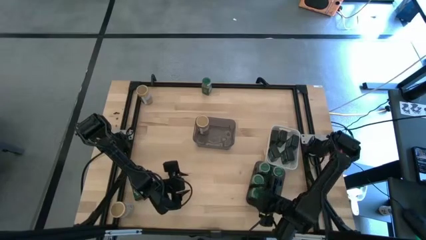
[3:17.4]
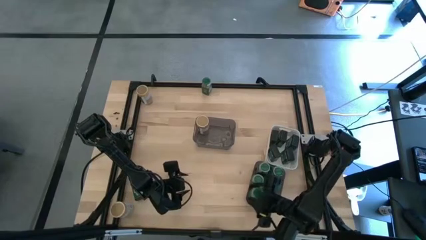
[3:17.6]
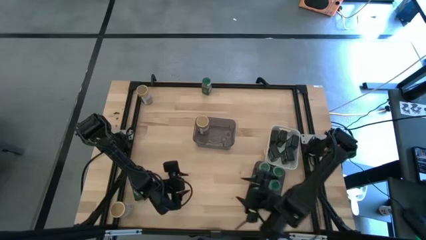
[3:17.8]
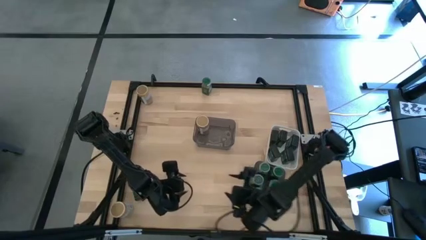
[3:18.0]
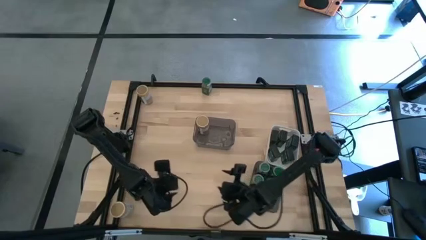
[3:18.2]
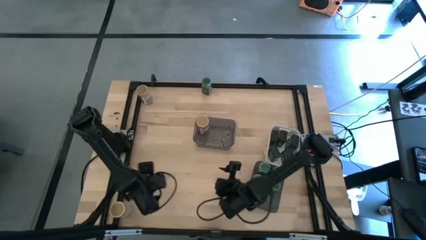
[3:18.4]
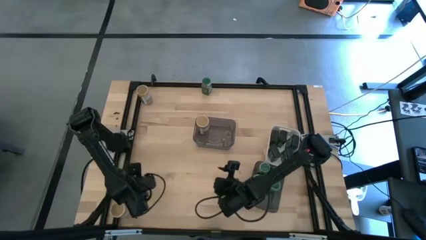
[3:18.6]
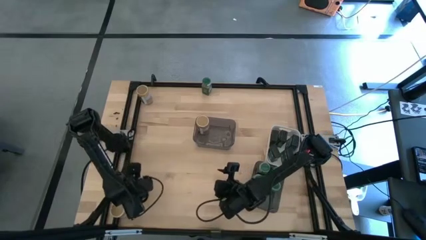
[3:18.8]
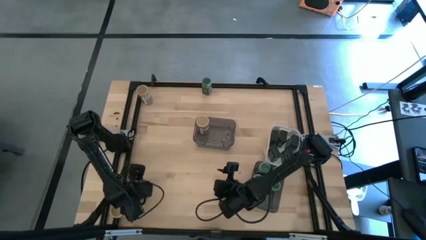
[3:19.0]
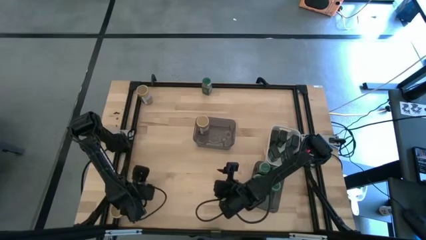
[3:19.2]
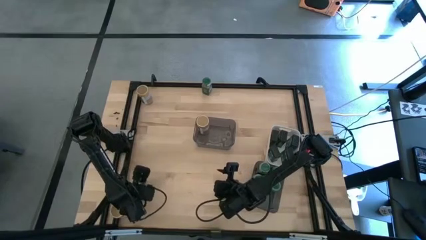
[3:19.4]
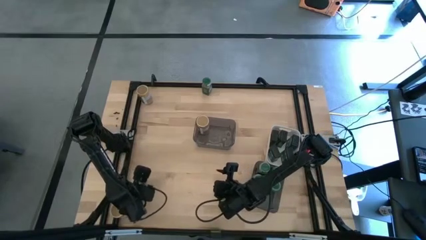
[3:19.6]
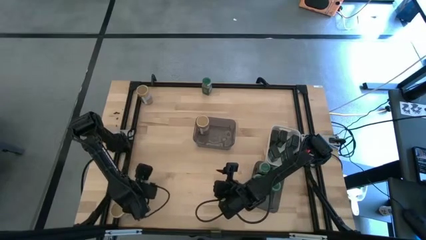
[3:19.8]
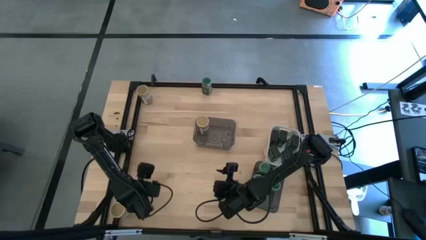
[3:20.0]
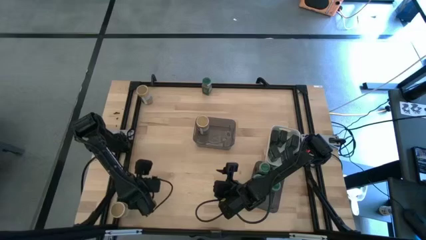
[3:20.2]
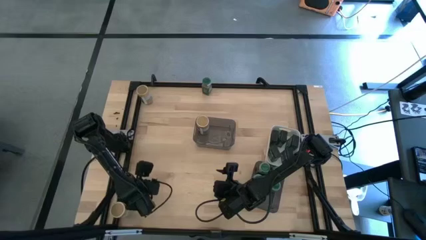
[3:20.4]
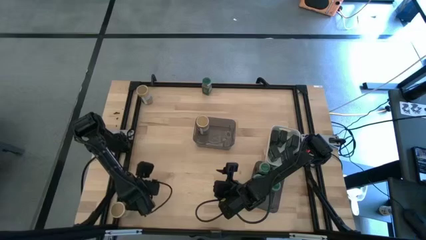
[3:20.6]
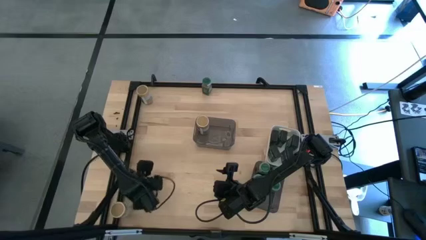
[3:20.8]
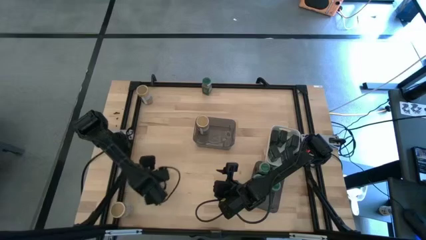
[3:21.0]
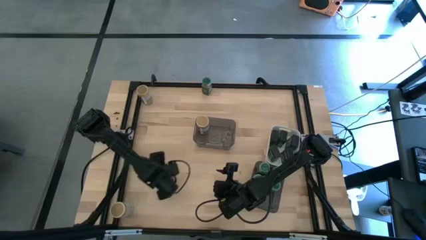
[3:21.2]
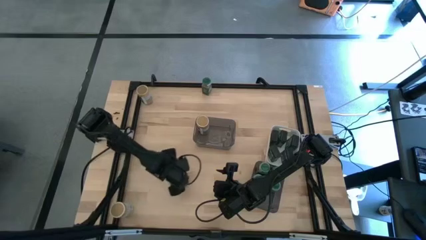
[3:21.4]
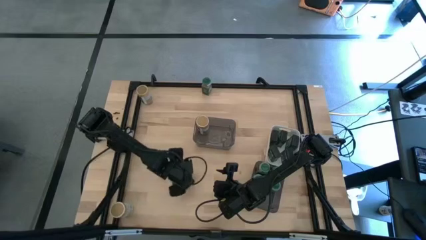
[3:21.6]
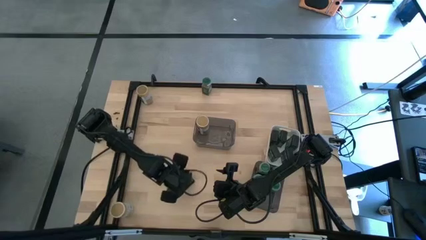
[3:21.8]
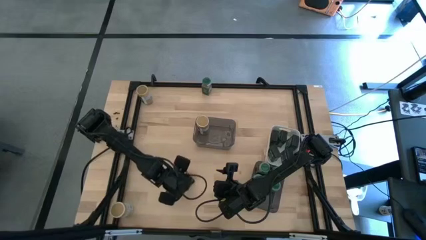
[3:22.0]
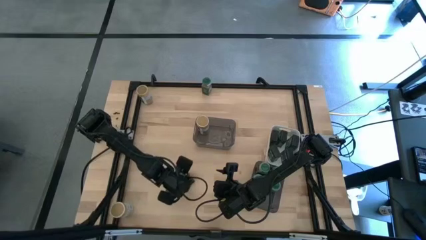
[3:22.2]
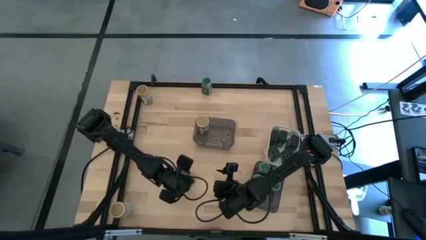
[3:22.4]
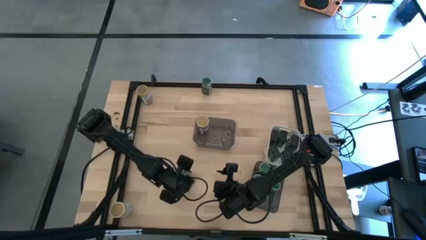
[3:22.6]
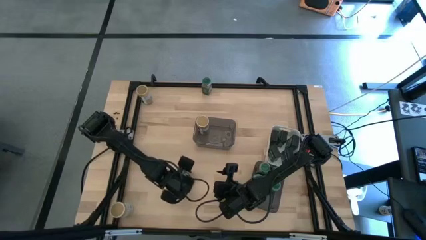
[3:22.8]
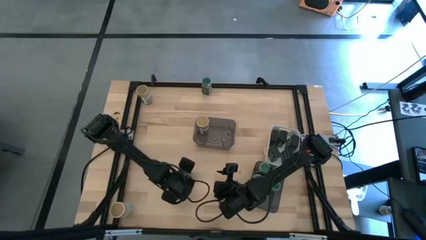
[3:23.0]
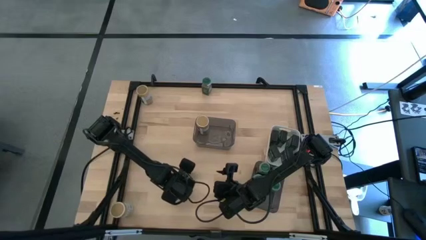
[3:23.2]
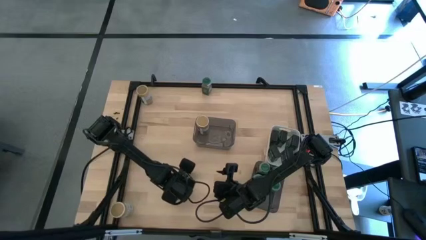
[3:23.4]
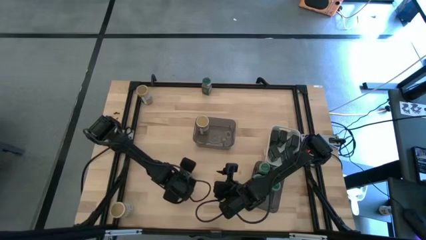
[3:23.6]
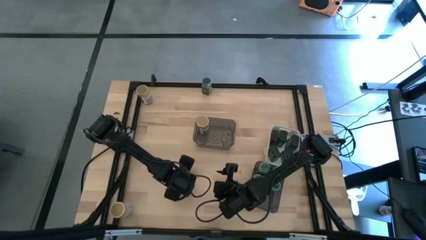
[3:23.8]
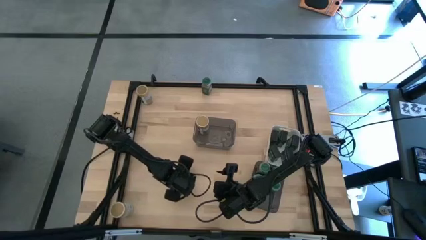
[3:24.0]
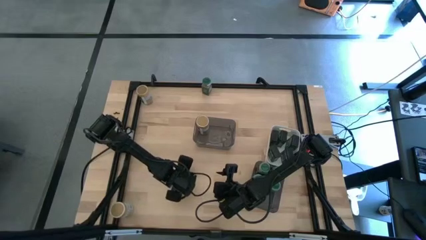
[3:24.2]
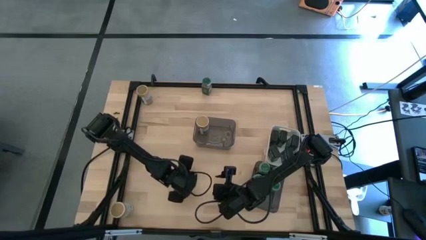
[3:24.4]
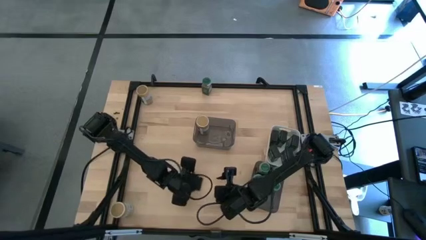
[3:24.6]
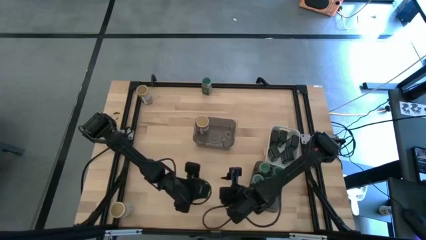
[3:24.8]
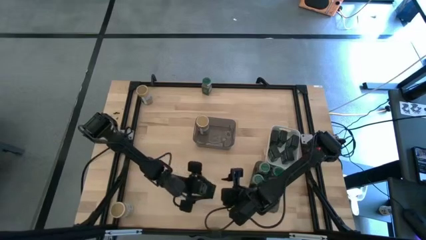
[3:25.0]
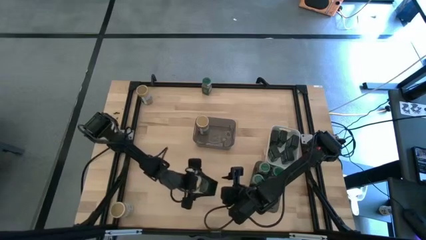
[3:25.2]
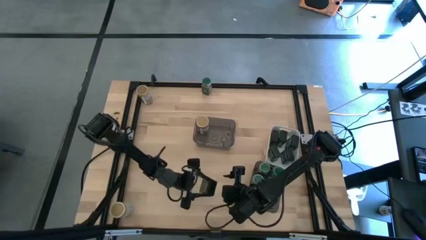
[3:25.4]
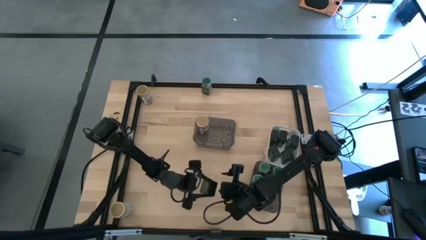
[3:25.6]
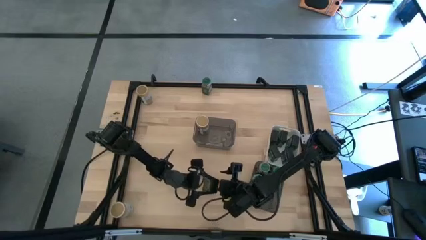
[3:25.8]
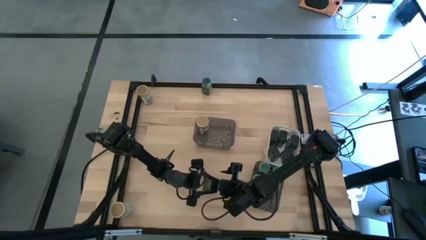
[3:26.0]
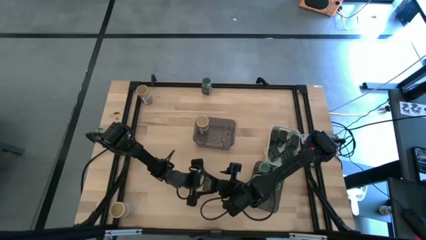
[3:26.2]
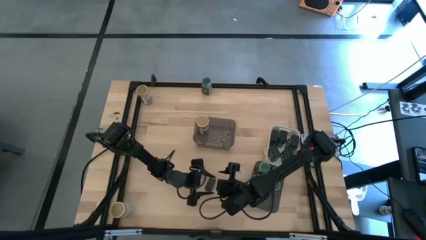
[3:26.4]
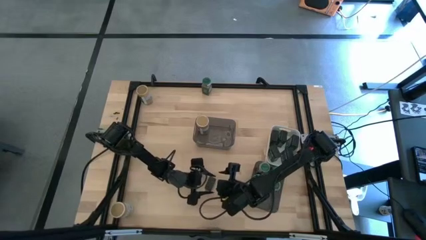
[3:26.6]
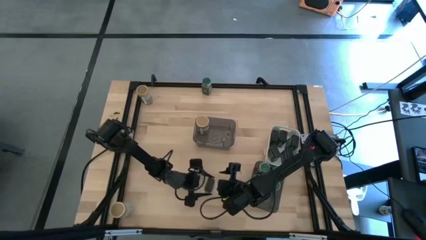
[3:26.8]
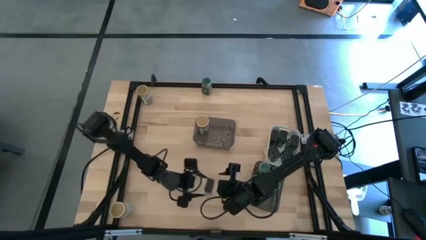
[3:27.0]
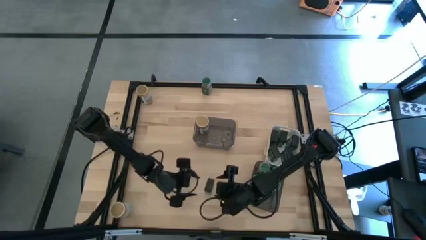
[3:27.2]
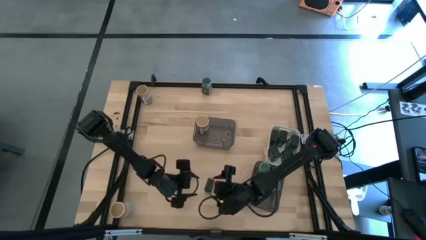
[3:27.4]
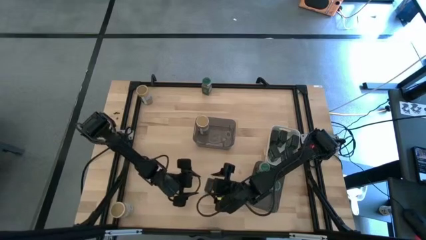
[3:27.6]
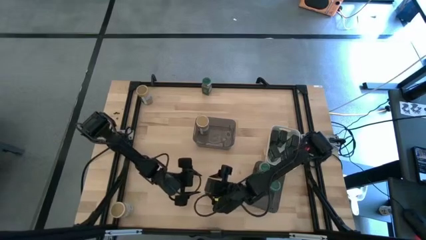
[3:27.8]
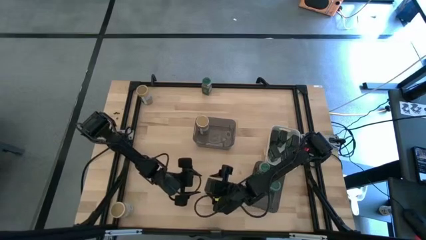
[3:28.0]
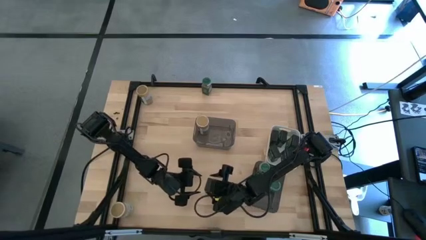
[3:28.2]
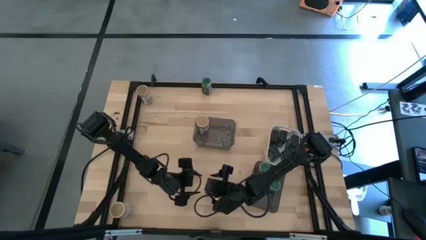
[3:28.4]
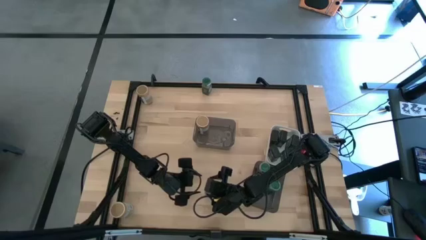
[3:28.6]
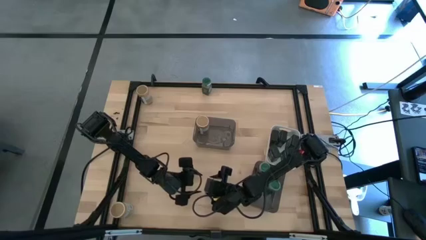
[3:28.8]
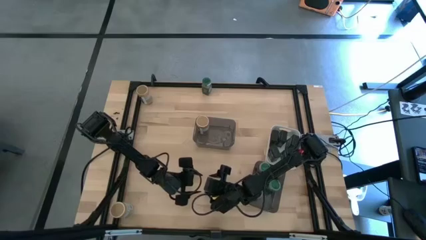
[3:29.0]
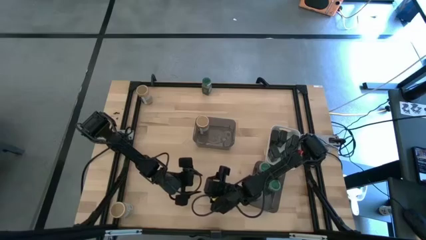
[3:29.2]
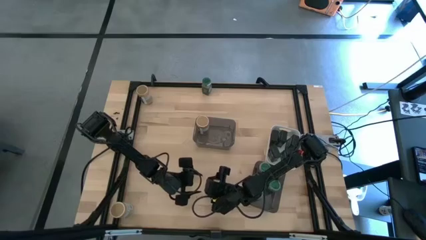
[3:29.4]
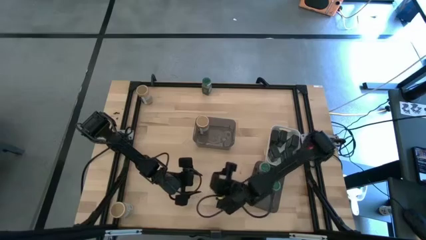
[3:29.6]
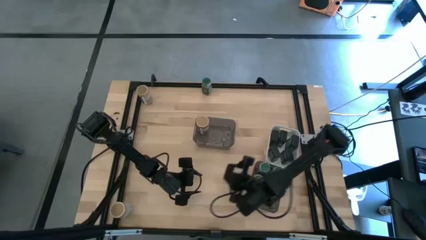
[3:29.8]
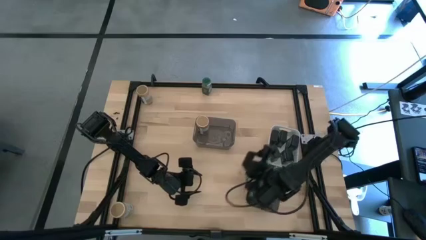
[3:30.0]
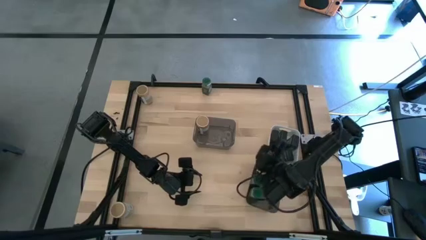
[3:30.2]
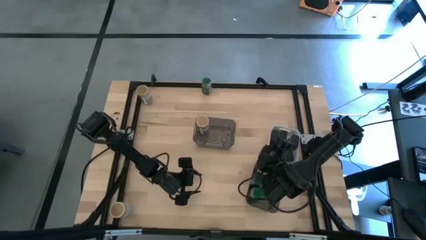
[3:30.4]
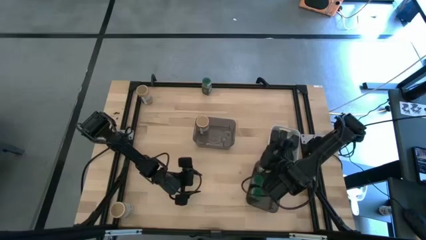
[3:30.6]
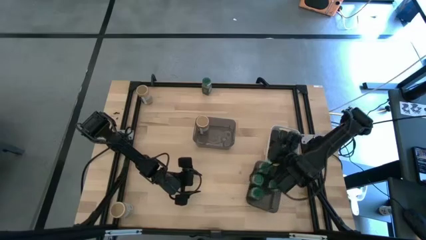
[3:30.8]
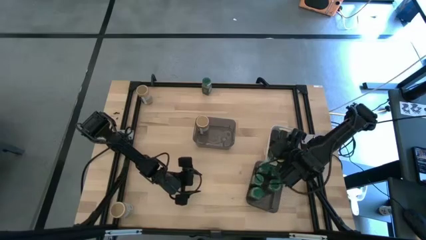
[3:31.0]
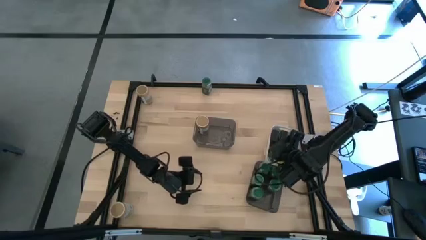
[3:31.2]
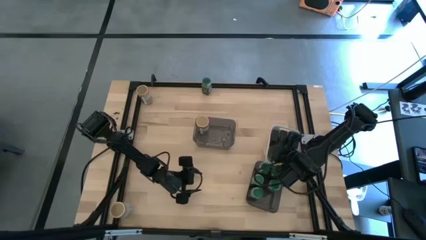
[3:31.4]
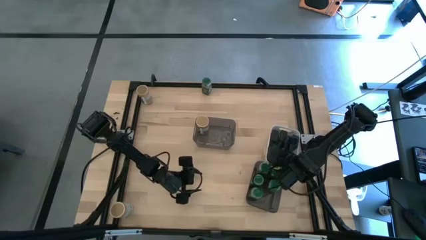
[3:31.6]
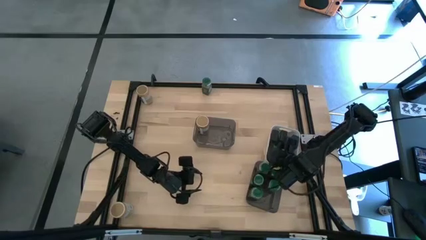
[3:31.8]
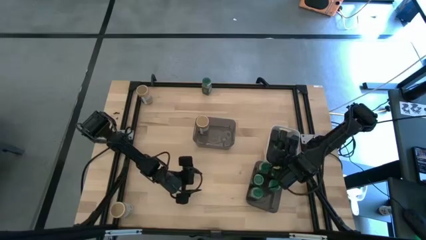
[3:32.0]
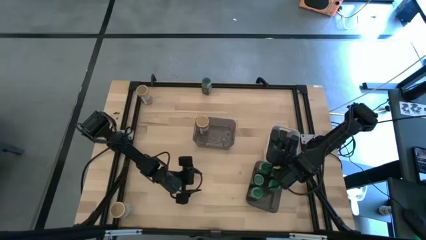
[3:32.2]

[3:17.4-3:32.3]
Task: Sort spices by type
Put the black seasoning can into the white bin

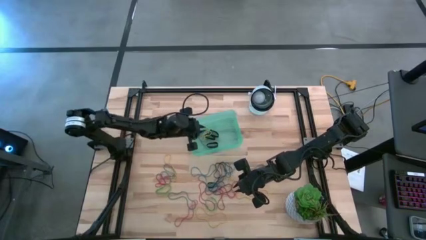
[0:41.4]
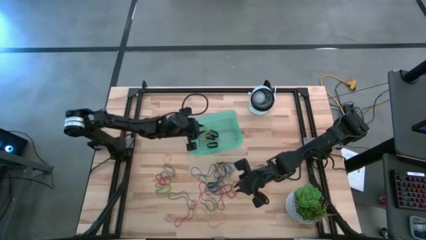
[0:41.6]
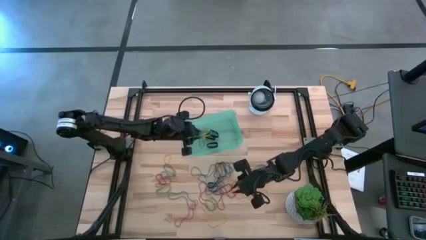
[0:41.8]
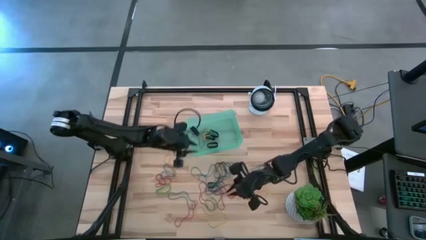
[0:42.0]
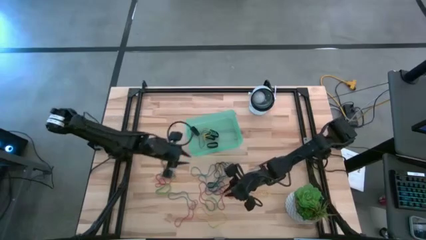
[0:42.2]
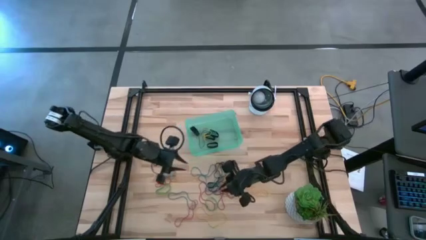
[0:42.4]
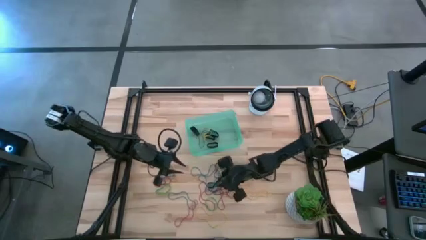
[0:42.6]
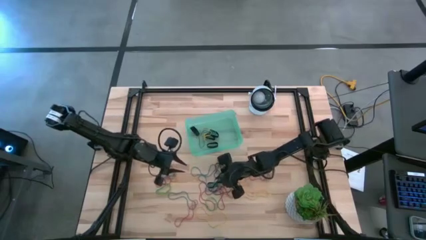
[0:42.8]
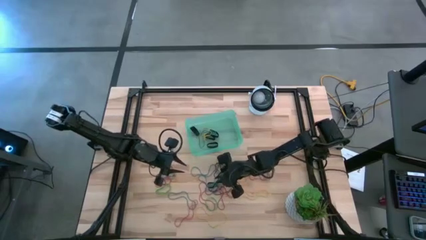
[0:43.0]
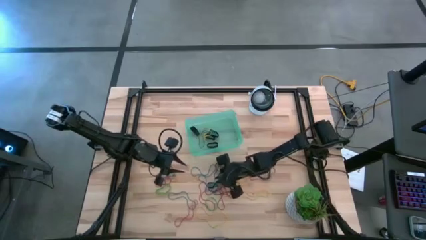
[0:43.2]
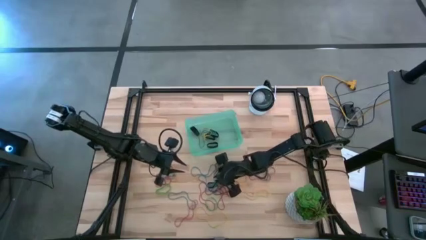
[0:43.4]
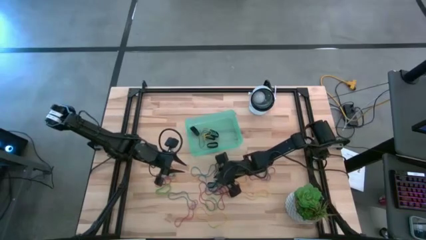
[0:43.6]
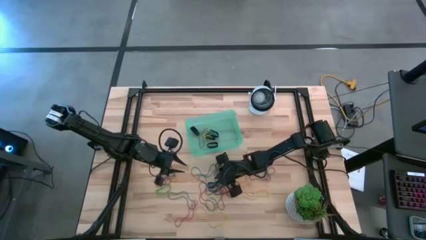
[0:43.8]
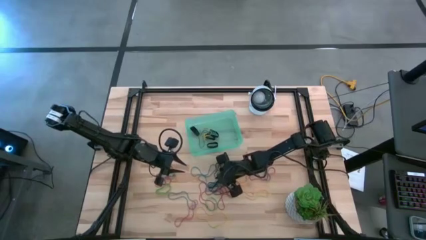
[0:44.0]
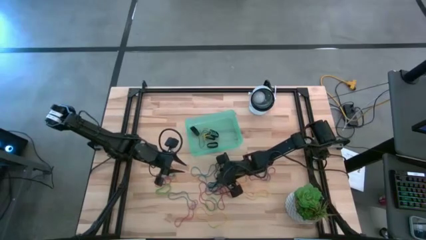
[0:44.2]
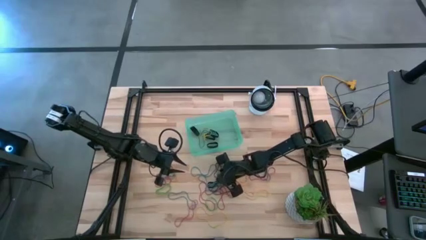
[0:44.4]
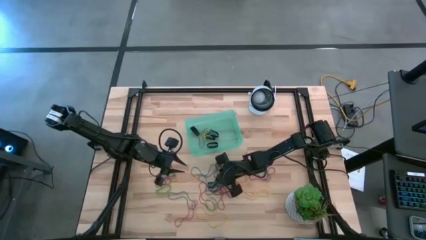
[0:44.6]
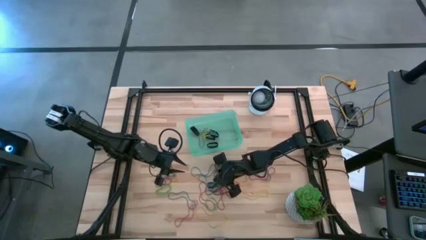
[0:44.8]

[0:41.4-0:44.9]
Task: Pick and place rubber bands into bin
Put the blue rubber band into the green bin
